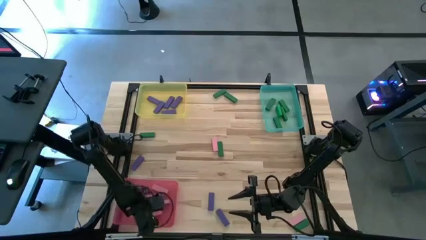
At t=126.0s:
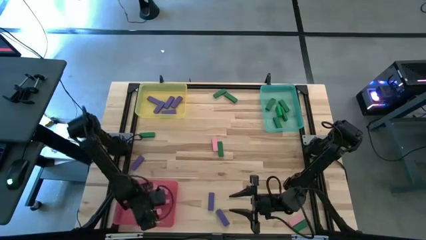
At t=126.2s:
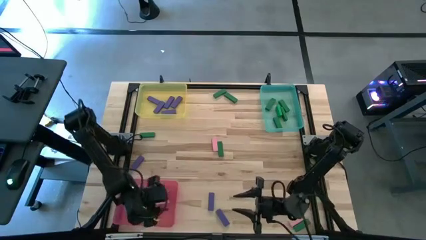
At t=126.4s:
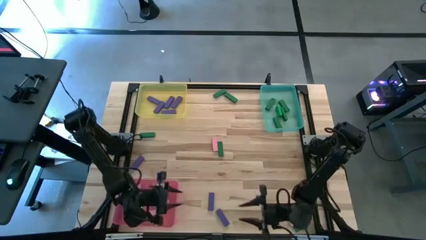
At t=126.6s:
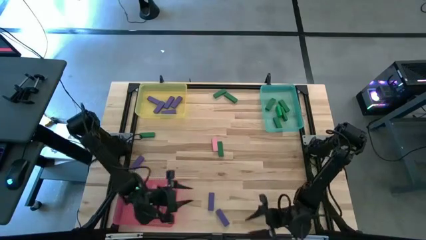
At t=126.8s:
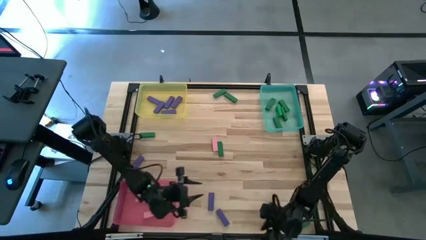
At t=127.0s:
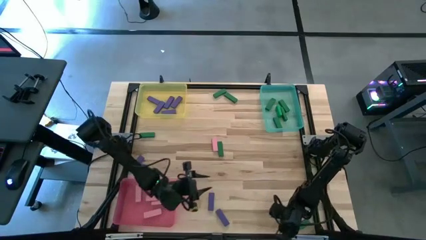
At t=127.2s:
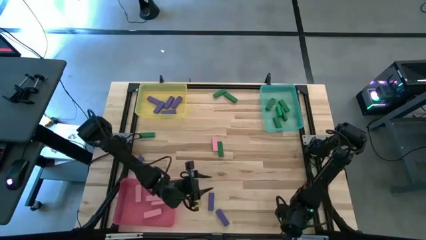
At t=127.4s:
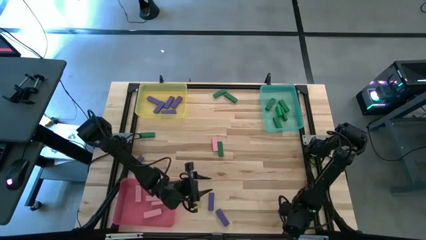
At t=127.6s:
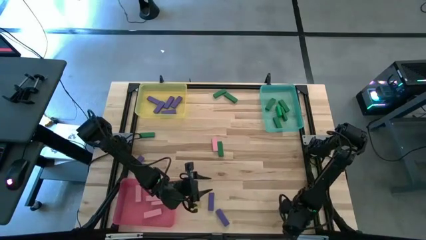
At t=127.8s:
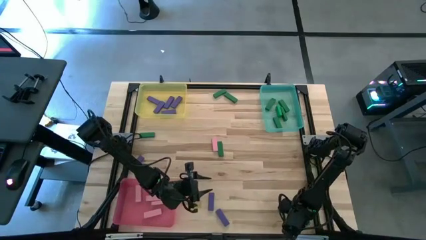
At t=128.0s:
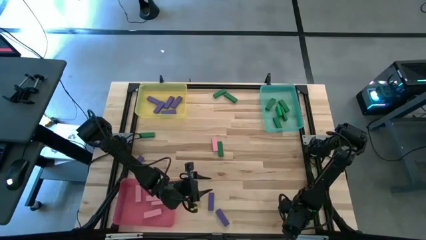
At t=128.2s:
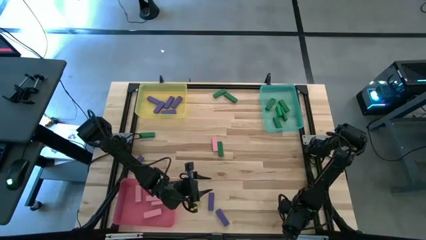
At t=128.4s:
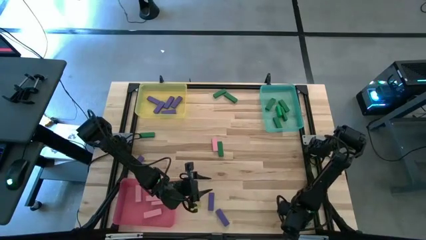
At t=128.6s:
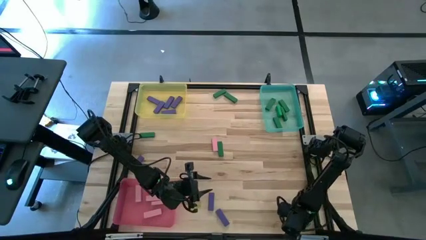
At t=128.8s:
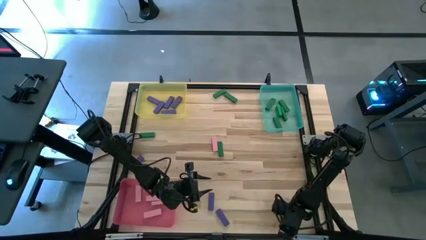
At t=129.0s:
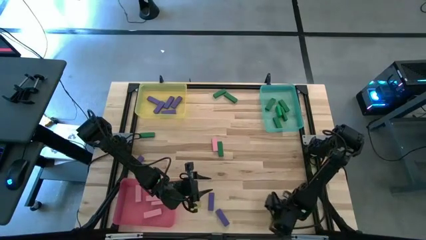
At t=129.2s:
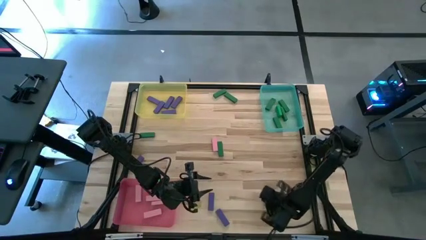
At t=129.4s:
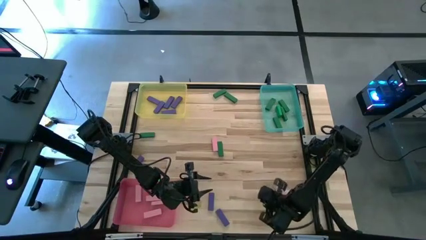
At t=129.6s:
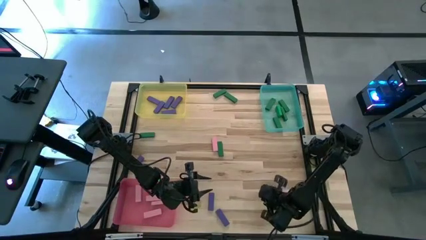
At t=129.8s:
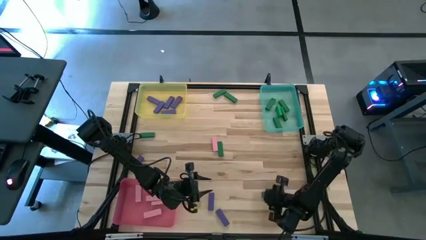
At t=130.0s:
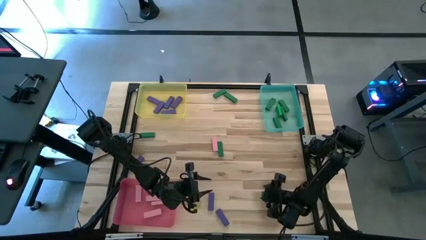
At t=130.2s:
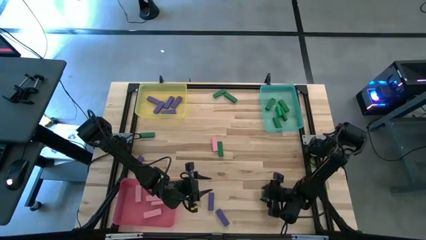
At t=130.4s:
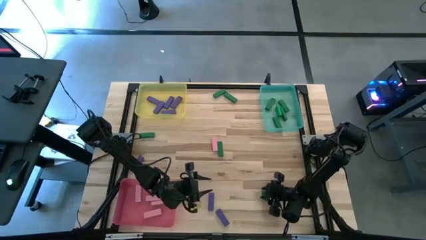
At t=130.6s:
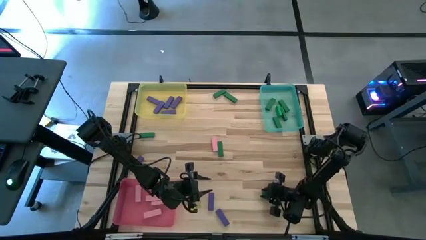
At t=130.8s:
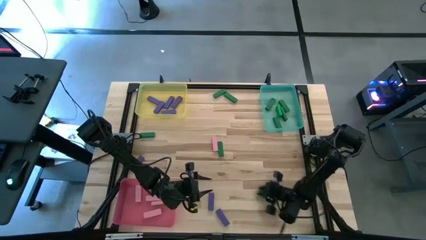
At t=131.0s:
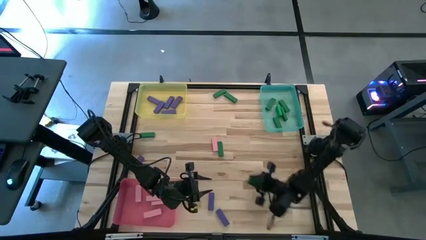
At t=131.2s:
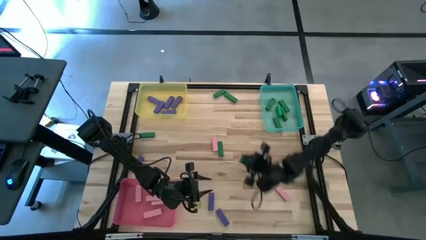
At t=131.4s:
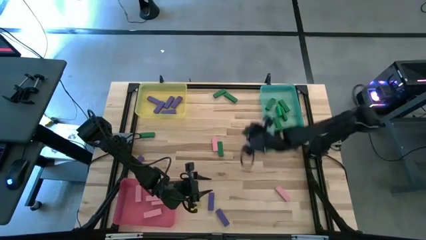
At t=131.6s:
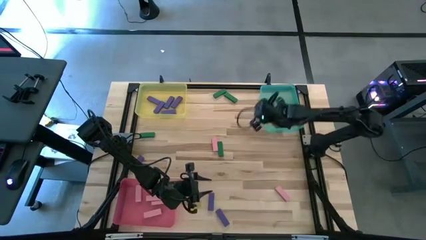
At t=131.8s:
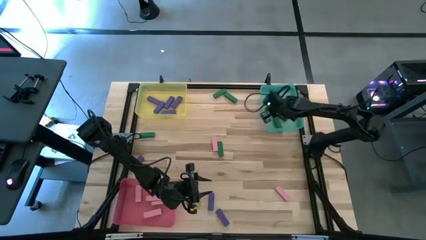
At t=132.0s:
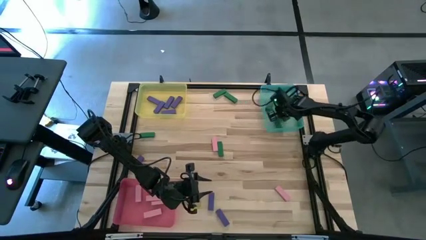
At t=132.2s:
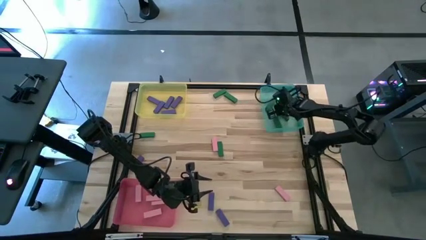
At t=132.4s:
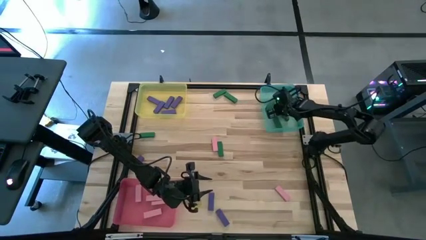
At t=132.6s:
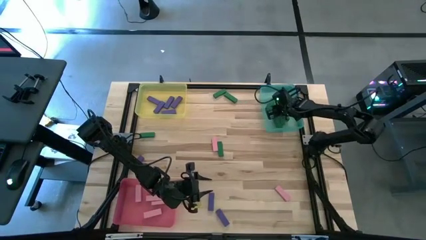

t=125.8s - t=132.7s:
Task: Sort blocks
Put the green wooden block into the green bin

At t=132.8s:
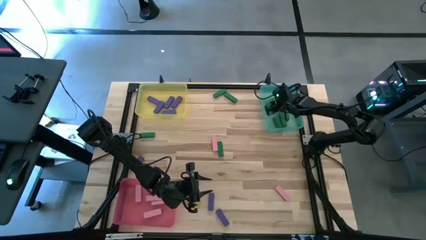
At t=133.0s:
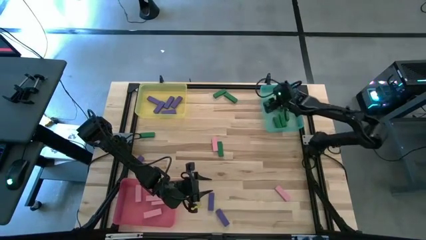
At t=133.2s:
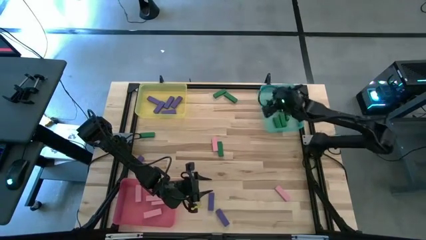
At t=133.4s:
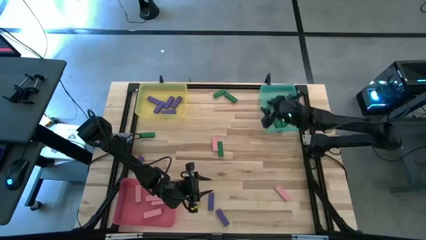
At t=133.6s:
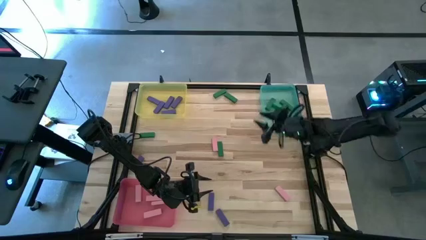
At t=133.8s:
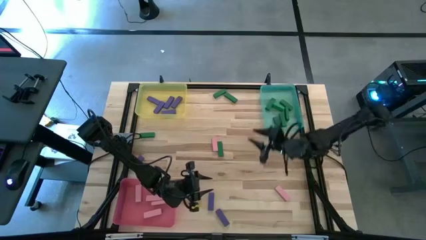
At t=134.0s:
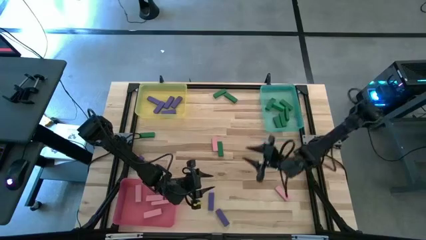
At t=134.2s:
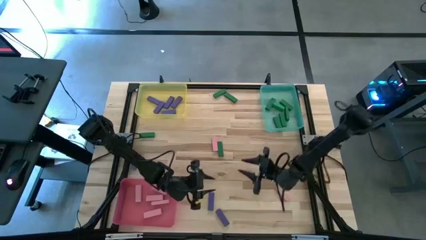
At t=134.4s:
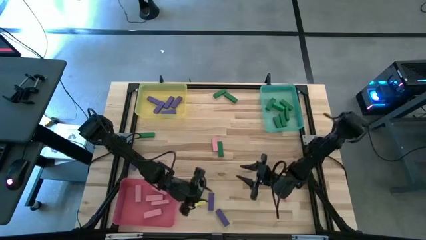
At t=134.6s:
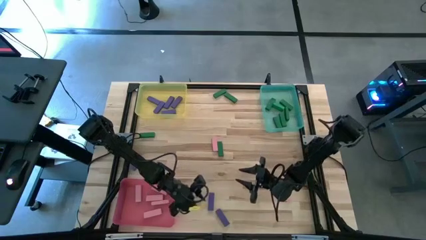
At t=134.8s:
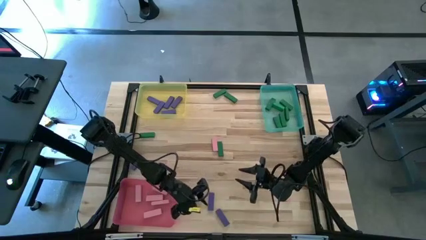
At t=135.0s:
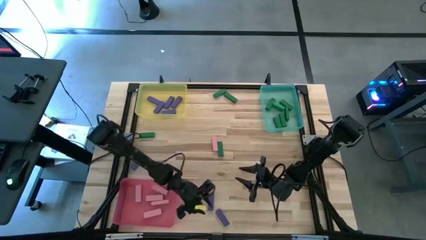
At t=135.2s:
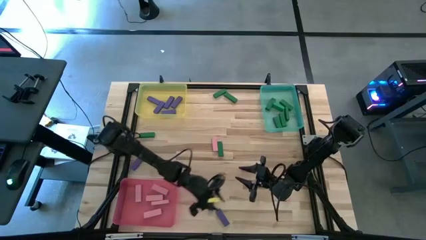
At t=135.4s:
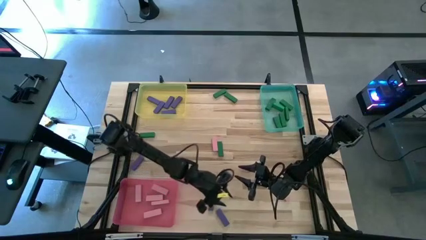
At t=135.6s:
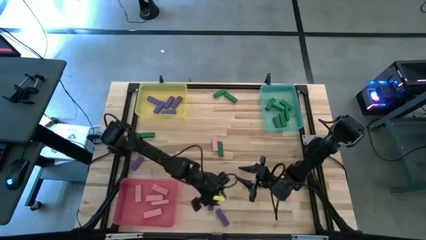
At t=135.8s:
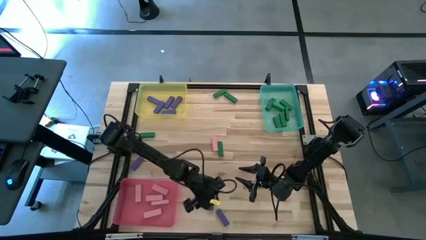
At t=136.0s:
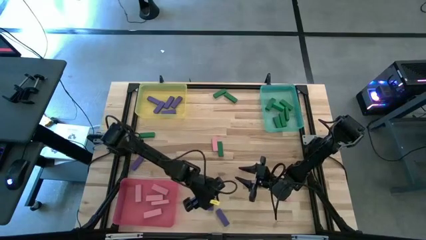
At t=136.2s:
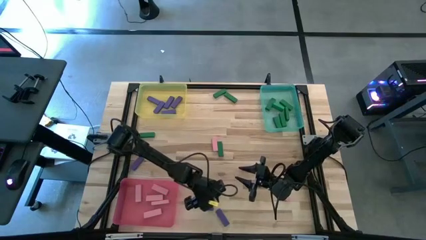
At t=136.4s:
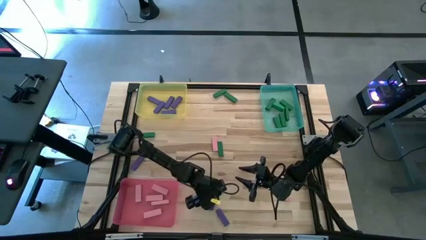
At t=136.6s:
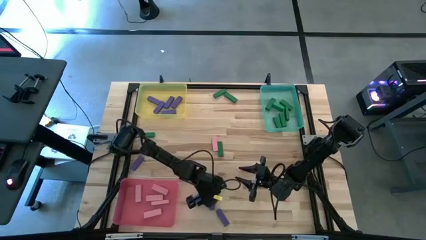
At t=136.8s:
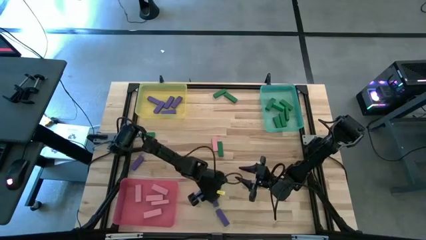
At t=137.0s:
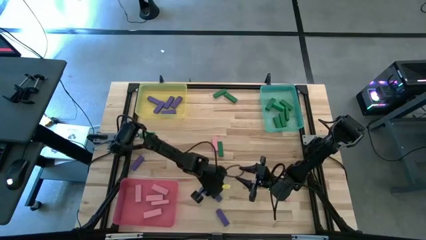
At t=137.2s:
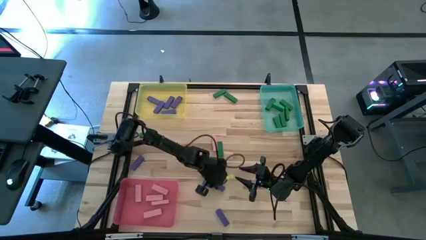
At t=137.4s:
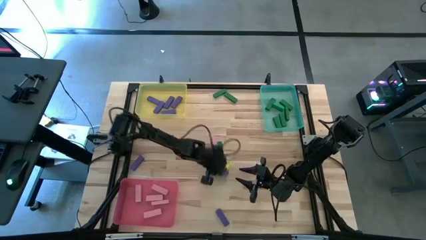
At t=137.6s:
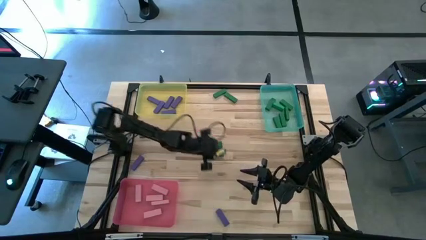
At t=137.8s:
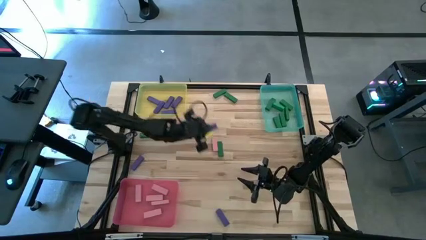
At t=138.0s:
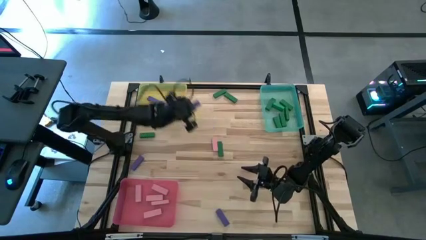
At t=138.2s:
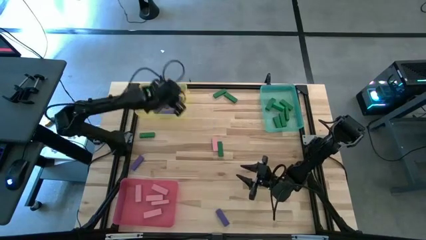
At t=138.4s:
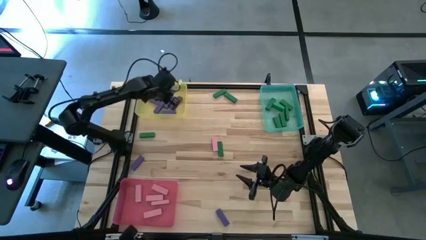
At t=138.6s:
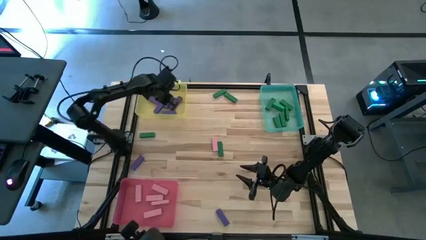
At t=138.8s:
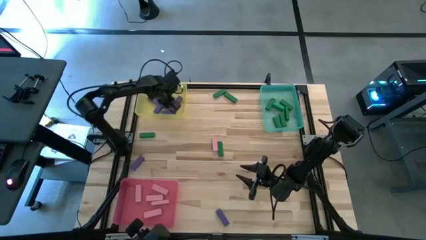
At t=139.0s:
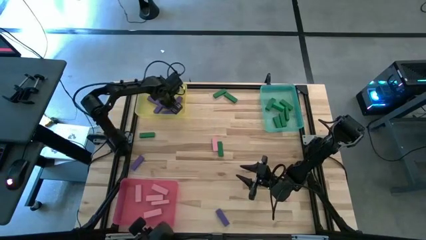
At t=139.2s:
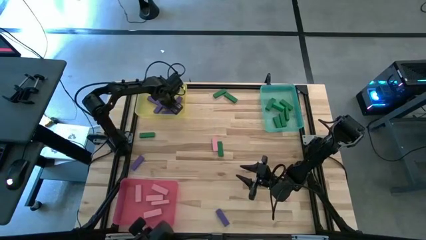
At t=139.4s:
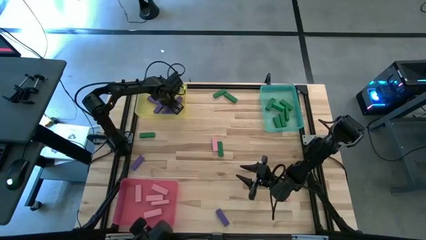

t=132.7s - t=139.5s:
Put the purple wooden block into the yellow bin

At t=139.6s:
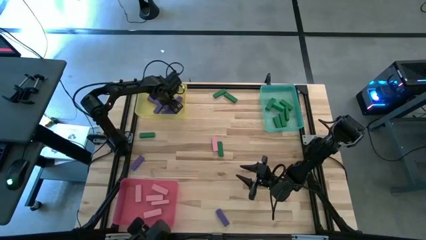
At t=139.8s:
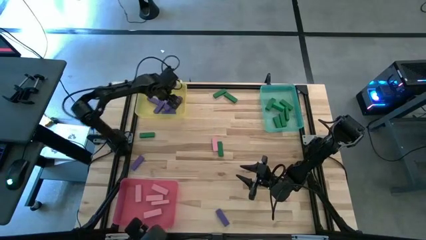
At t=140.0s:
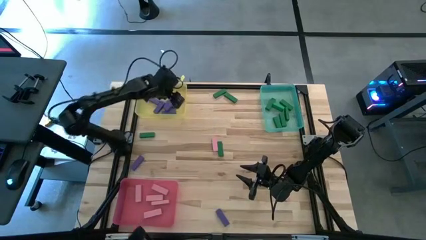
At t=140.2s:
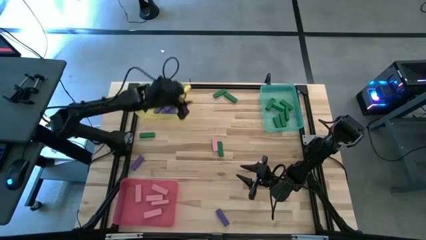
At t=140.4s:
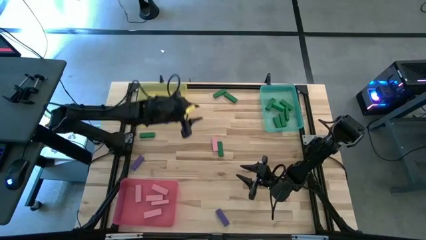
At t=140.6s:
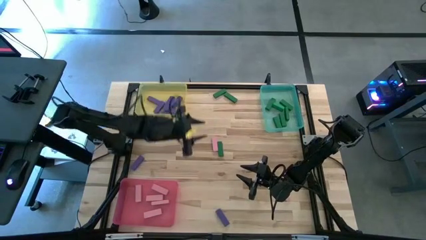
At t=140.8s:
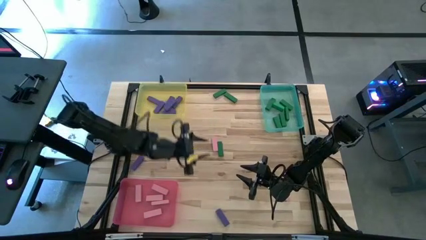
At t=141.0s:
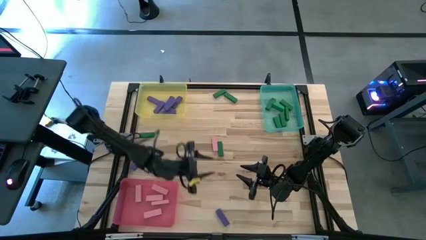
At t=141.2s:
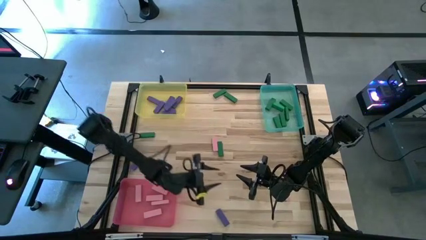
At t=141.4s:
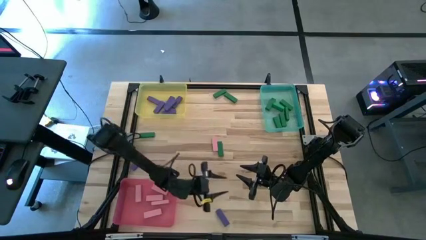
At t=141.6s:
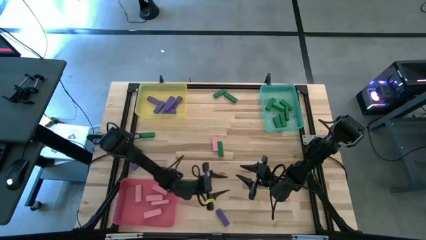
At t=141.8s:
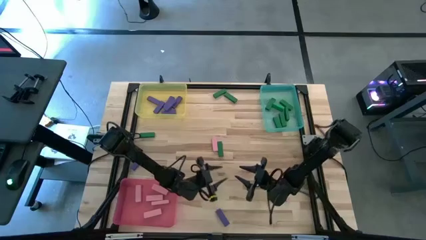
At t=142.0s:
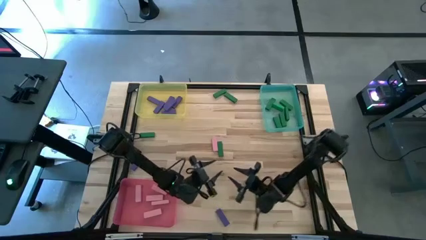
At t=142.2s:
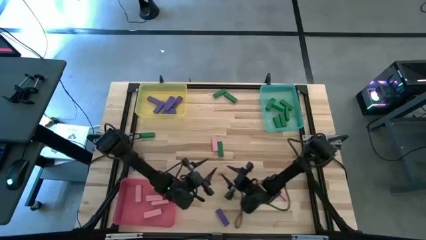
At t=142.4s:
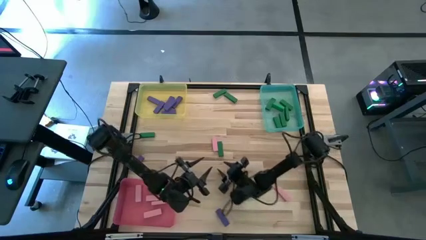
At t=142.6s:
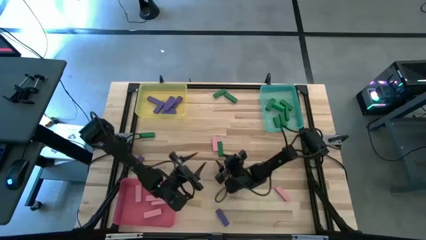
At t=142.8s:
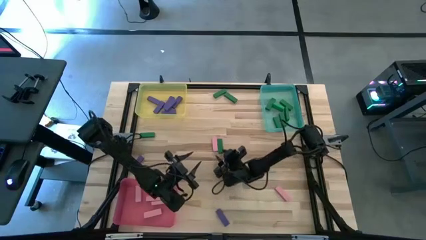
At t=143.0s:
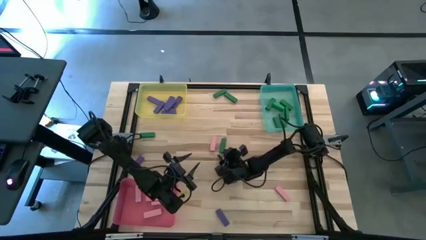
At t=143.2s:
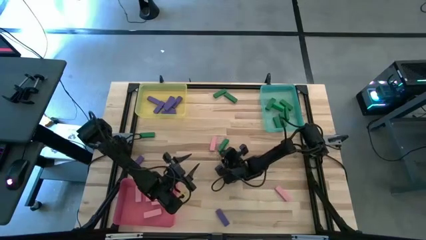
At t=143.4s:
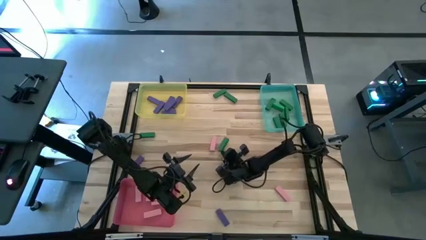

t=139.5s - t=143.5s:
Put the green wooden block into the green bin
